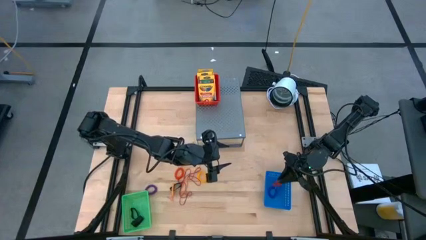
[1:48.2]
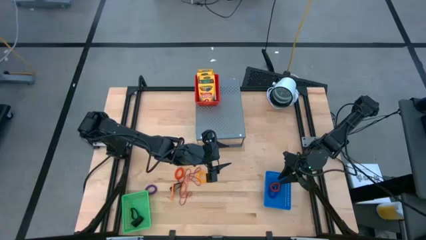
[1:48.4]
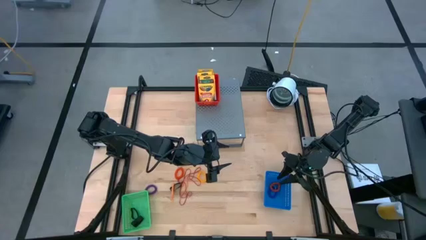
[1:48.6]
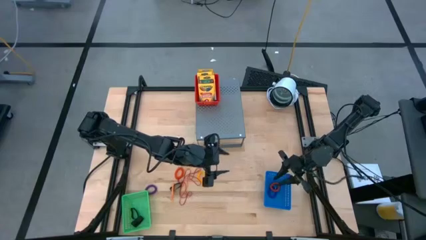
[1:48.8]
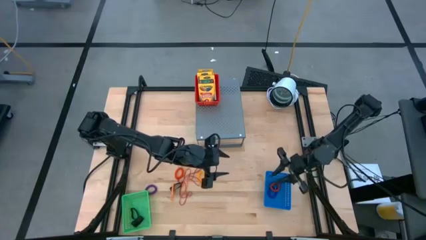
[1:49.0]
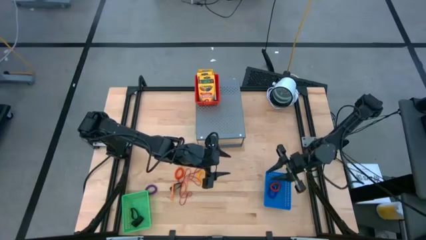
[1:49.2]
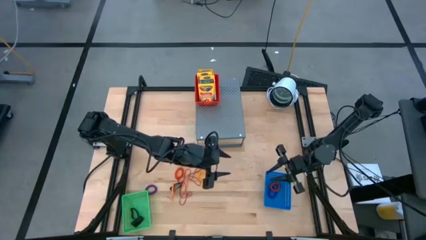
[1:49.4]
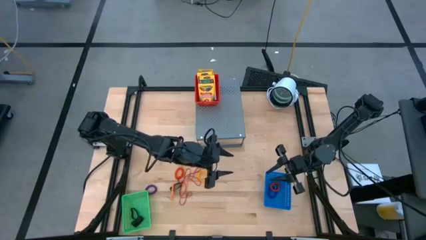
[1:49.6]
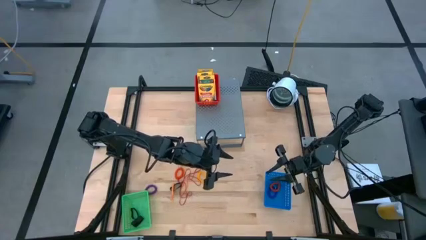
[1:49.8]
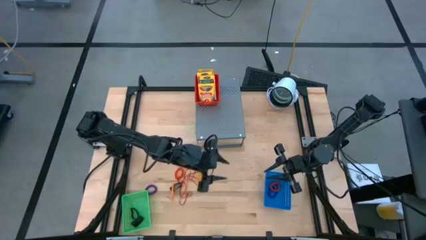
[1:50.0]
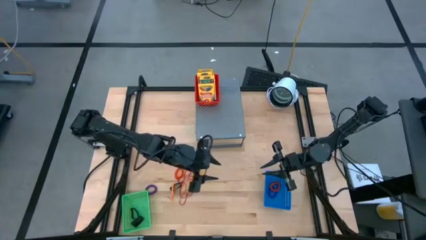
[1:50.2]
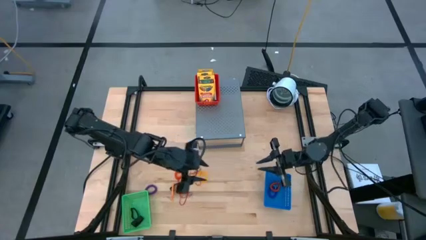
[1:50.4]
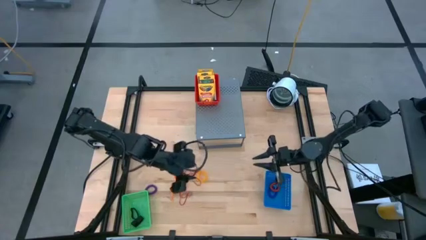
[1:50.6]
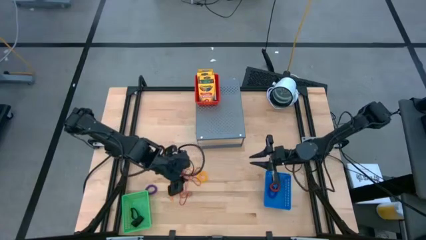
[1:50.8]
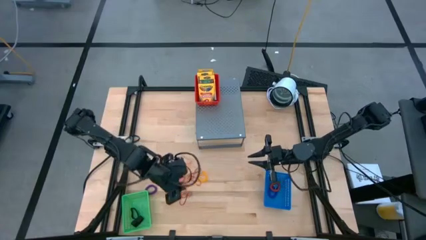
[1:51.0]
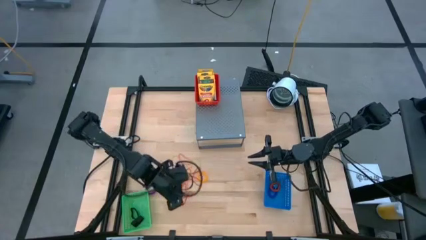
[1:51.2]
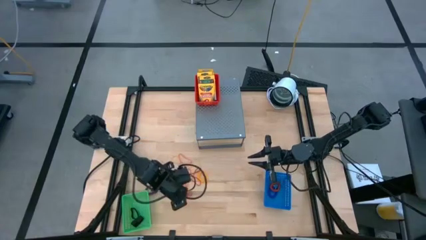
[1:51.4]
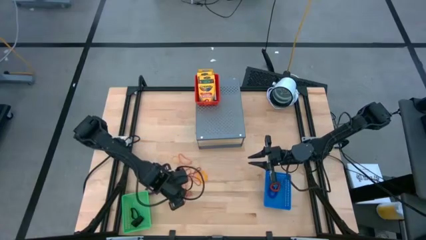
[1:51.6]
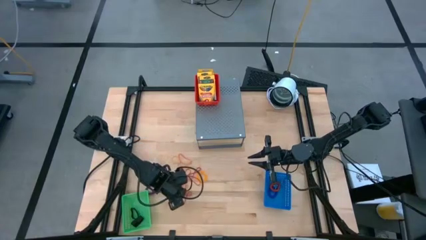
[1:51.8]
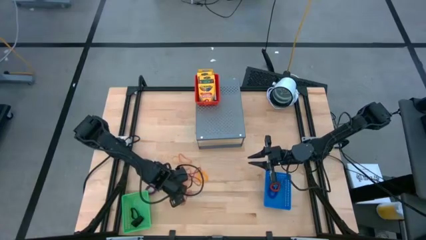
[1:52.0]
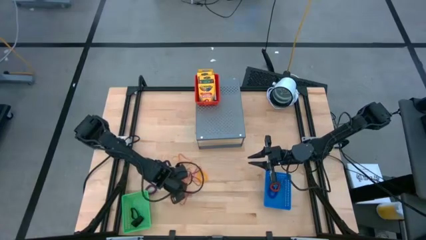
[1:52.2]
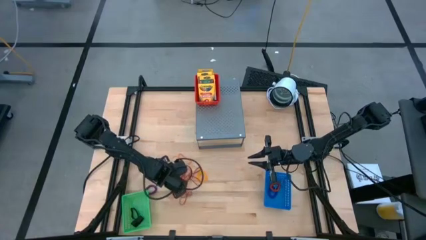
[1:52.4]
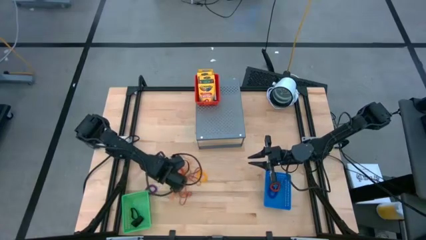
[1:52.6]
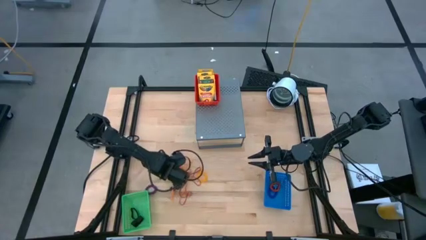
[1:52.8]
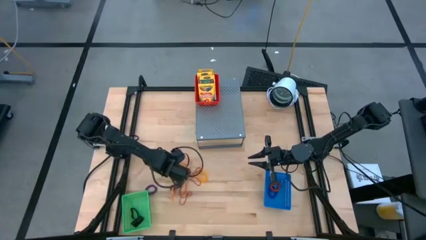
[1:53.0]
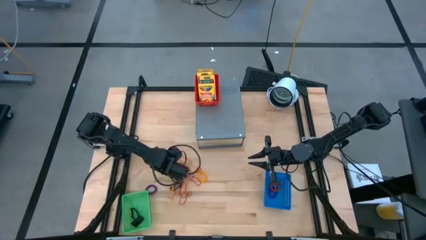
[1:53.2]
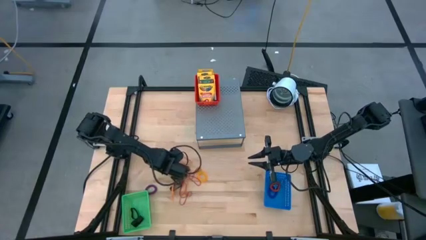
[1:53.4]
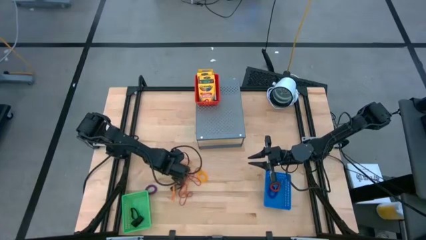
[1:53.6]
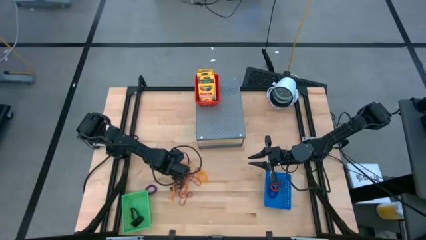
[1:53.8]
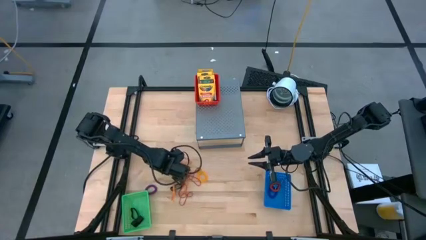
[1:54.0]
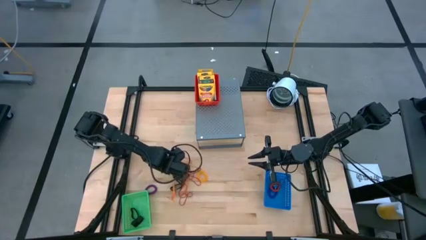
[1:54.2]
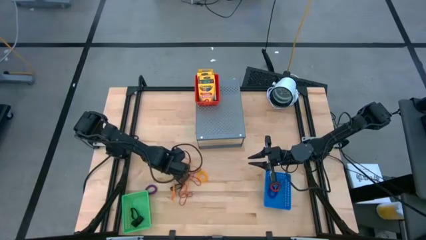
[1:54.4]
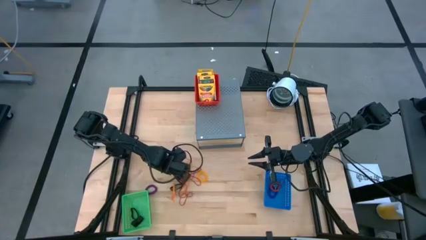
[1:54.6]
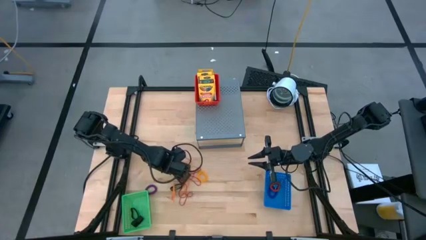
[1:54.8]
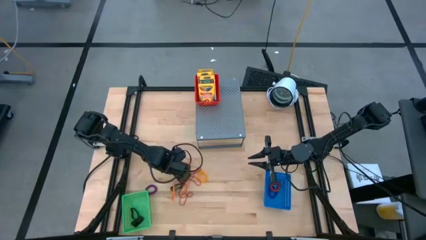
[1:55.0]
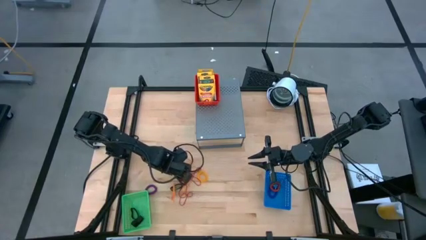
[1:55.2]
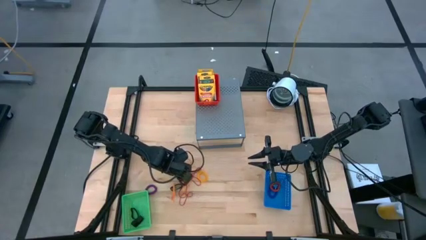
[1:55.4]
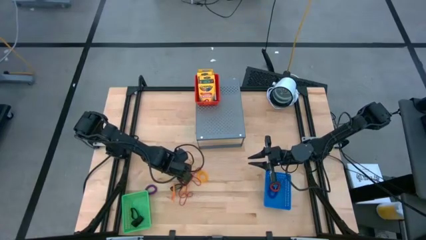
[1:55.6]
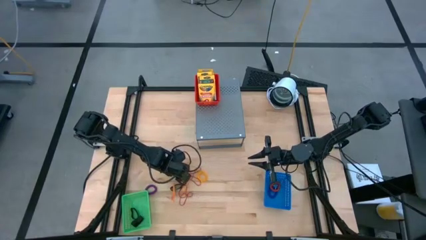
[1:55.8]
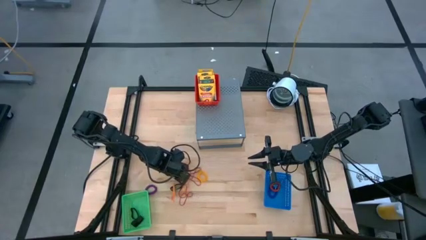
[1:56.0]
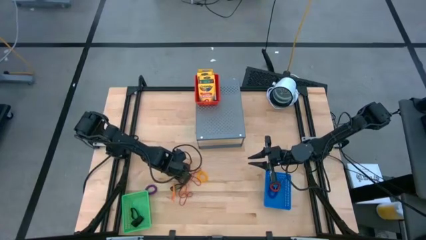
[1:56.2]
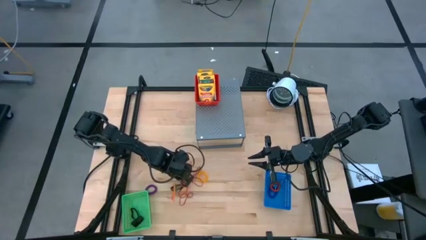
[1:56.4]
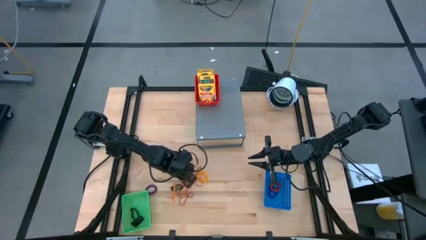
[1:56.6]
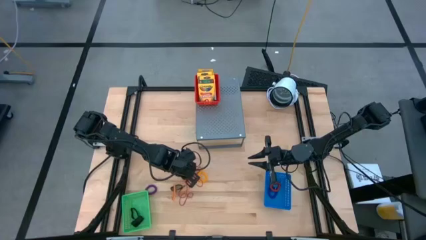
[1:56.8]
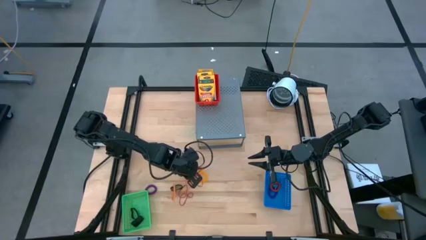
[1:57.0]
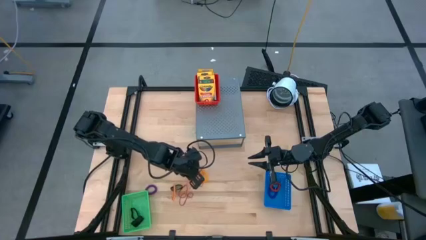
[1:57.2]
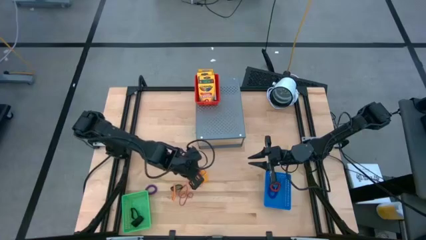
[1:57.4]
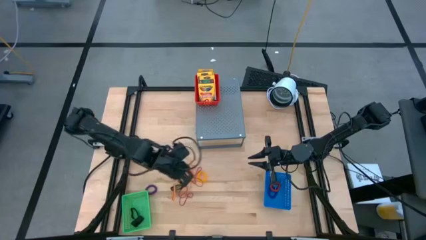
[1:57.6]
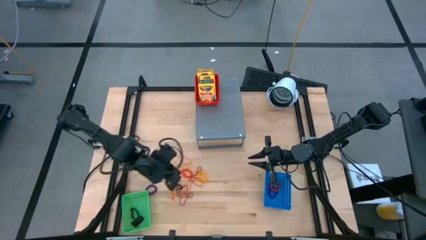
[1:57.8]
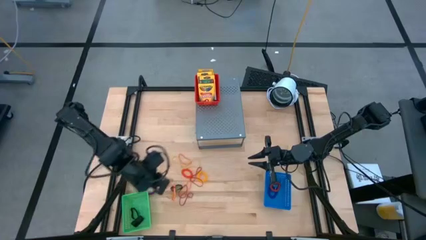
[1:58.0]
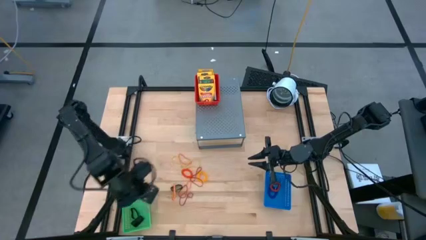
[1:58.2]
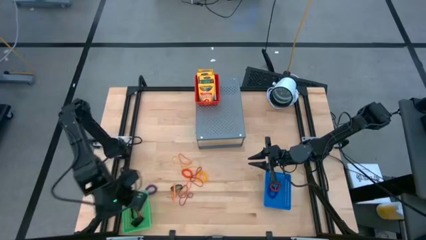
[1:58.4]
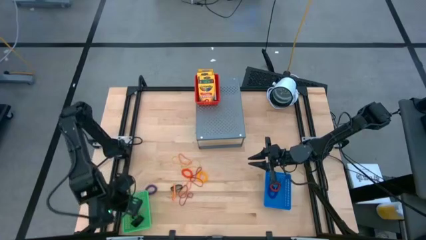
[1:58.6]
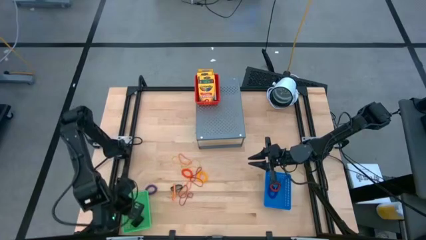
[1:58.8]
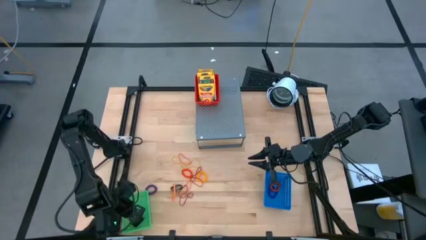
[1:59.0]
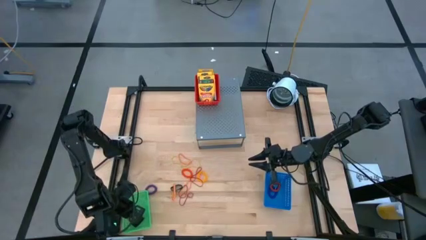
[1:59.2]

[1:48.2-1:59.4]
Task: Pick & Place Office Desk Supplies
Put the red rubber band into the green bin

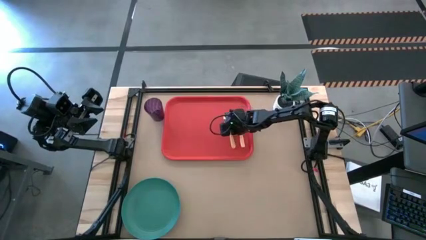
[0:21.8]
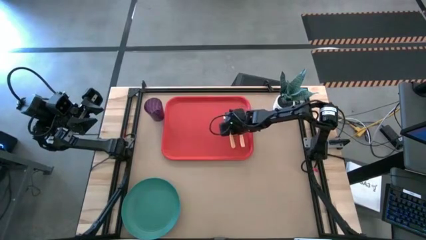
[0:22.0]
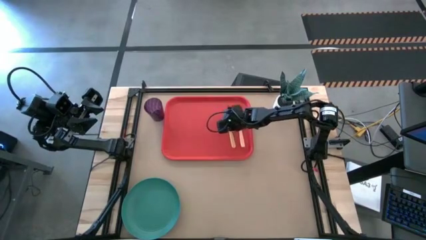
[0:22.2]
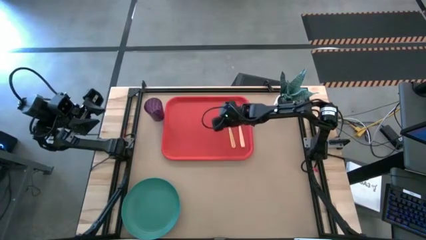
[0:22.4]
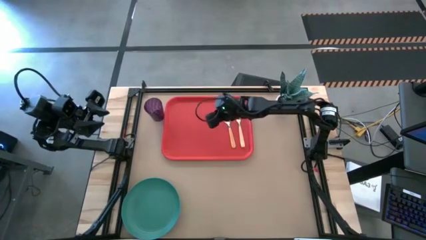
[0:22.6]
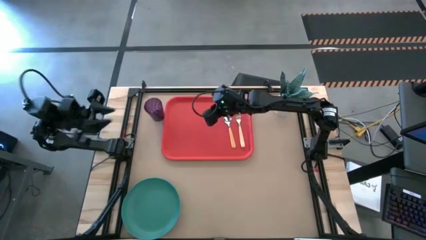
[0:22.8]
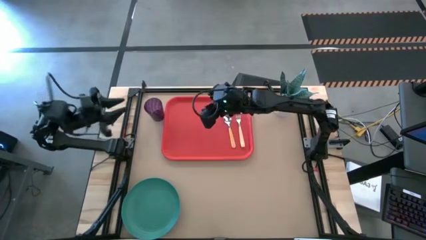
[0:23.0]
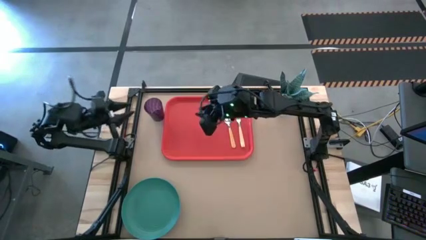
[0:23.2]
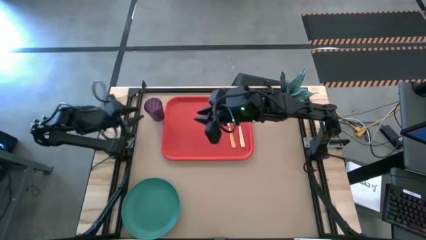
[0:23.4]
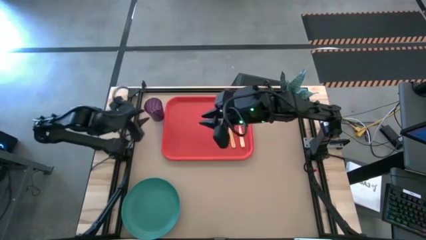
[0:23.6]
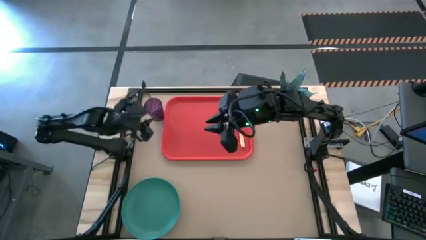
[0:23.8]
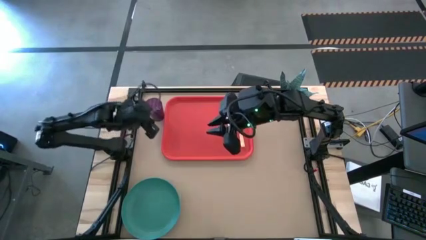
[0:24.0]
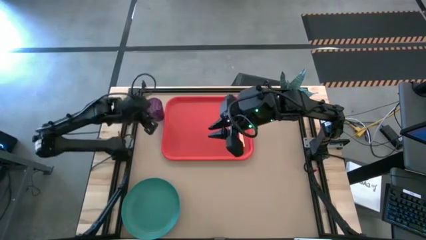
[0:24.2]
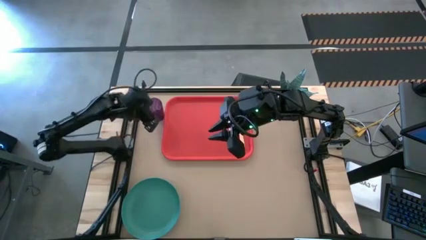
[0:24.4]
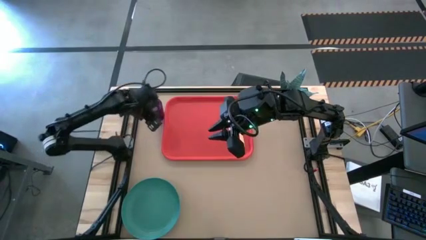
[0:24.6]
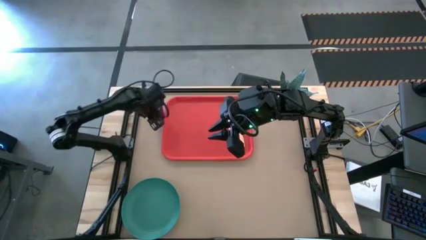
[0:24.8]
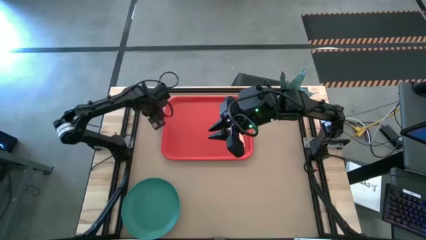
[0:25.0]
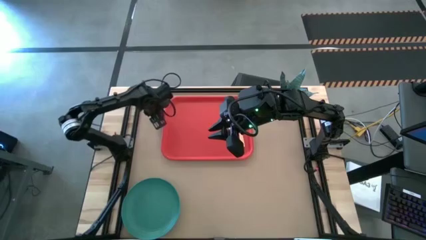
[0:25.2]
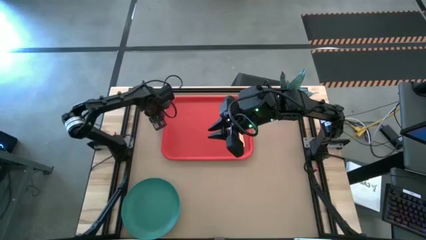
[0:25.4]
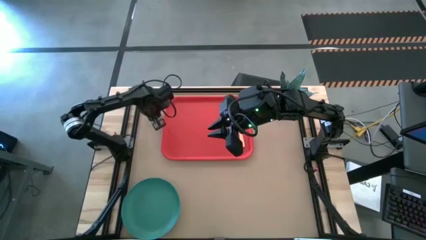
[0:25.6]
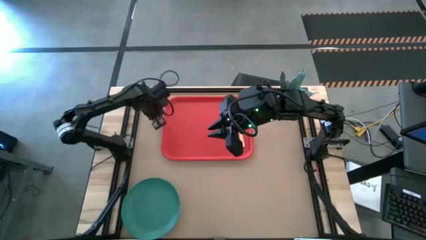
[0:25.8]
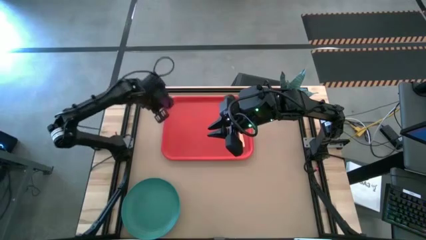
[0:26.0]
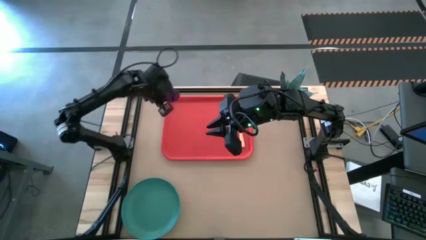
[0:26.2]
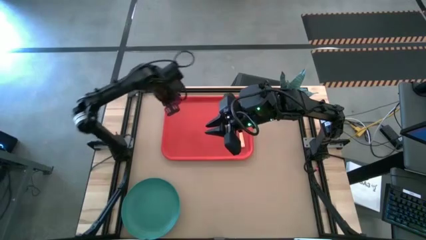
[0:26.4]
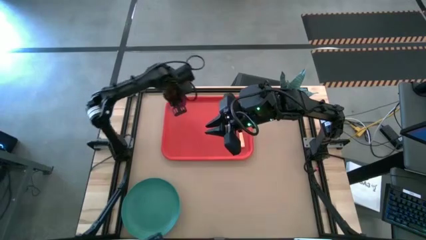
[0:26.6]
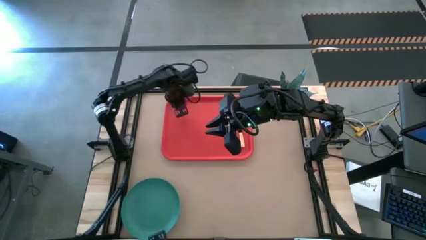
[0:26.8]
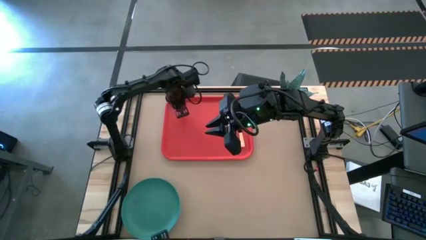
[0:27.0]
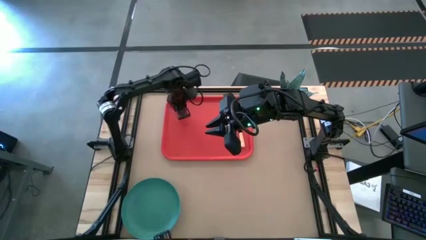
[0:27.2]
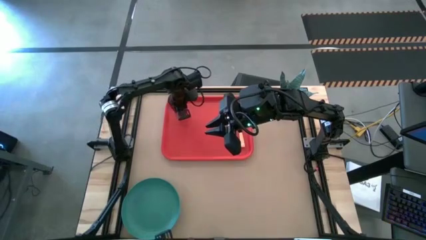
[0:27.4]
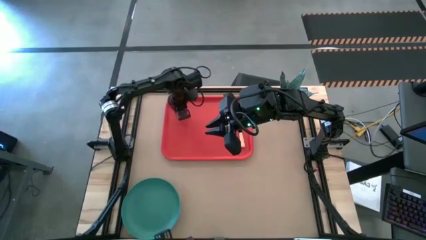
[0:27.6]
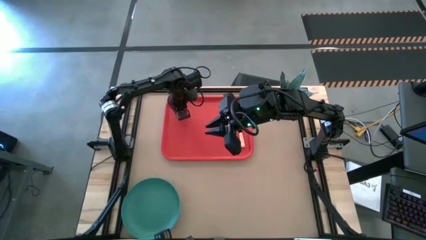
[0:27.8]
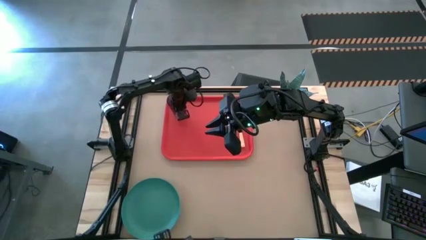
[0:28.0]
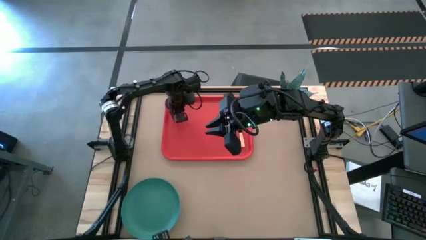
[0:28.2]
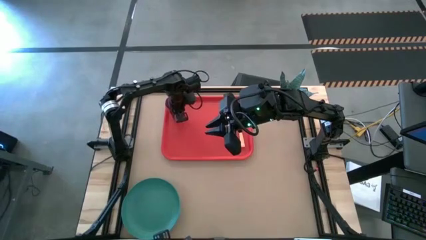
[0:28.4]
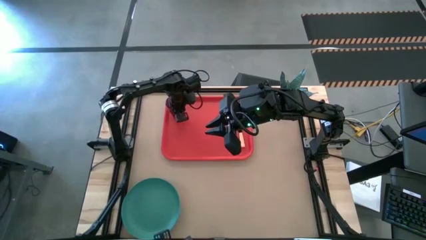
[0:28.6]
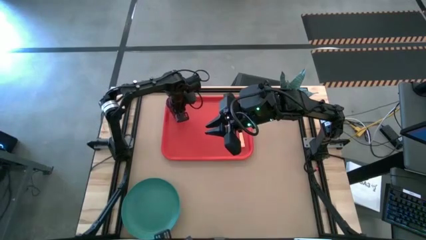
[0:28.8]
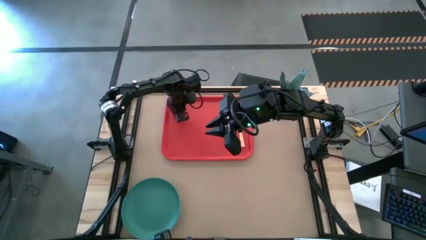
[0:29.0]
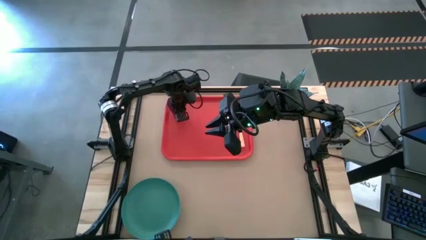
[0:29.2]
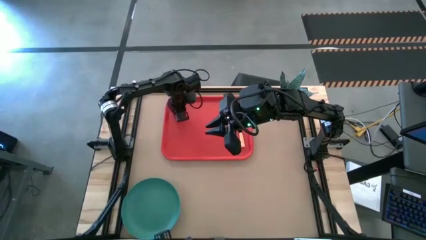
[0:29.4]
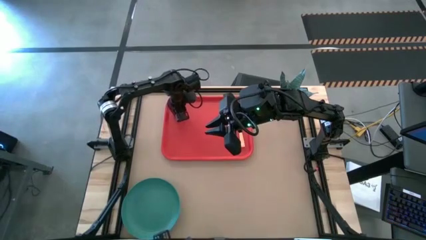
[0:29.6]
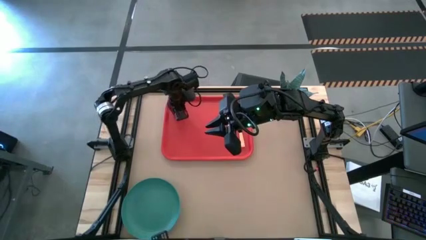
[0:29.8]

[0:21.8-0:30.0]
Task: Pick and place plate/cup/fork/spoon on tray
Put the violet glass to the top left of the red tray
